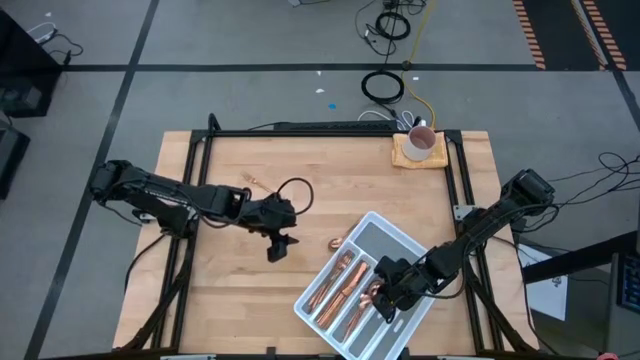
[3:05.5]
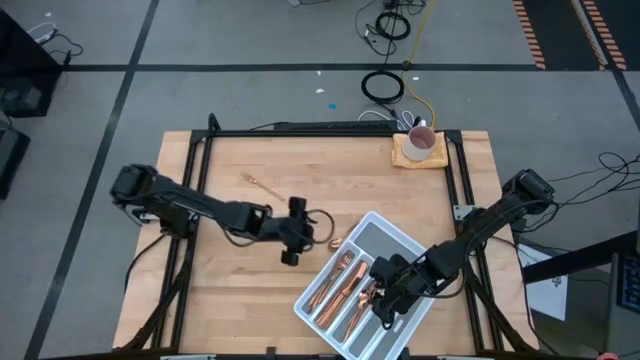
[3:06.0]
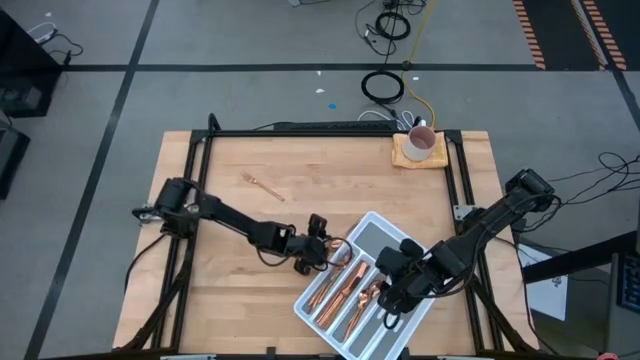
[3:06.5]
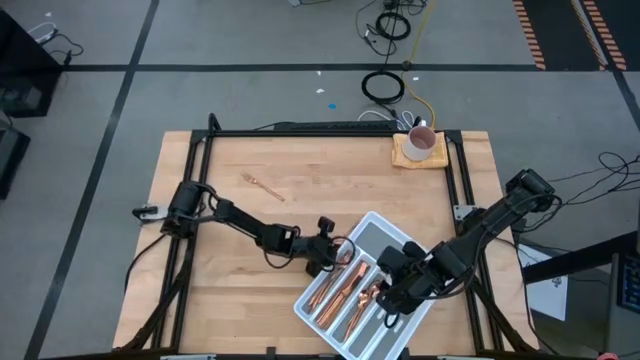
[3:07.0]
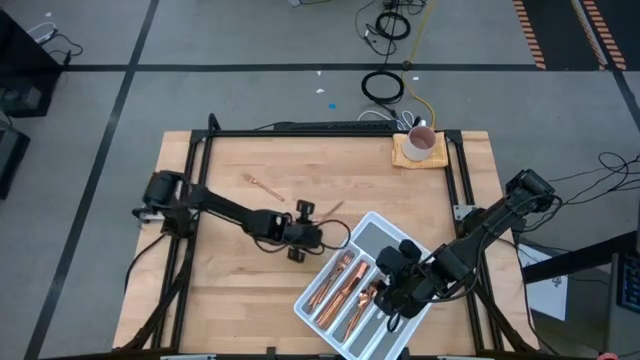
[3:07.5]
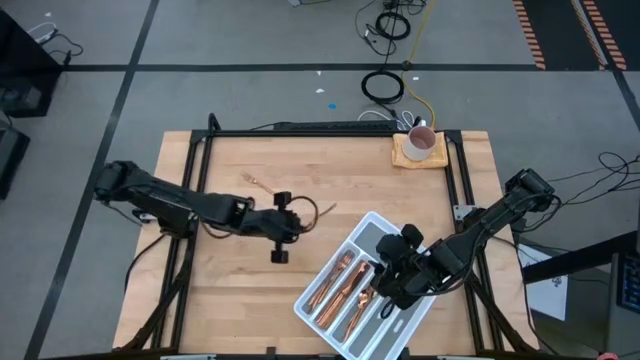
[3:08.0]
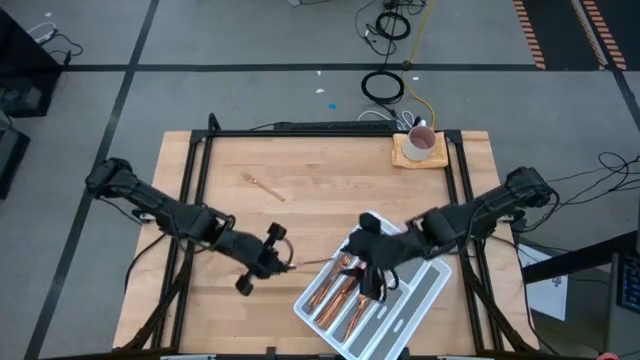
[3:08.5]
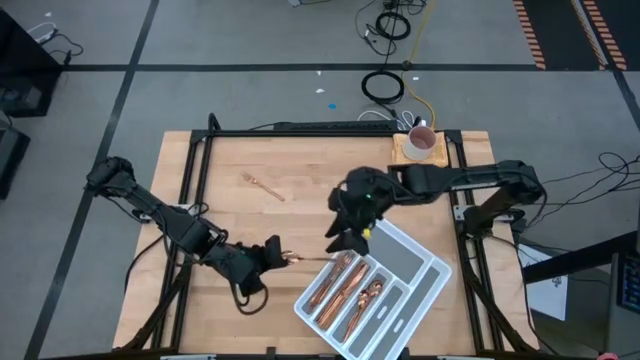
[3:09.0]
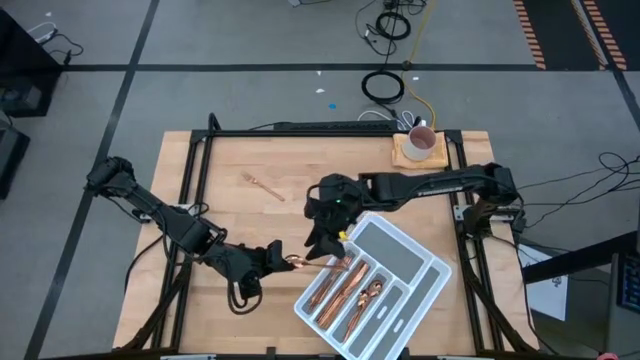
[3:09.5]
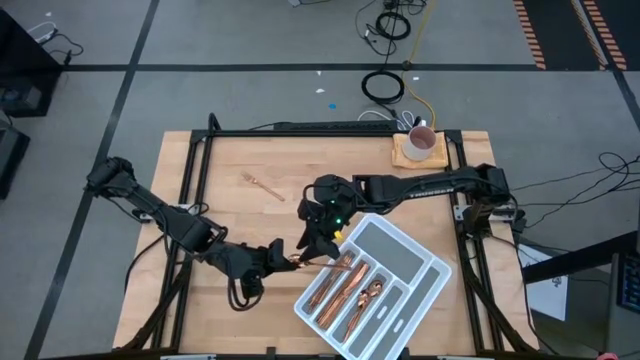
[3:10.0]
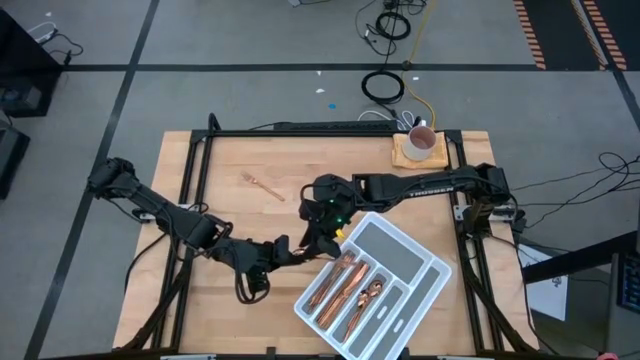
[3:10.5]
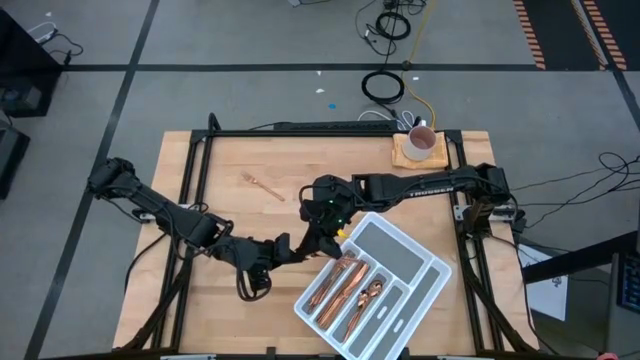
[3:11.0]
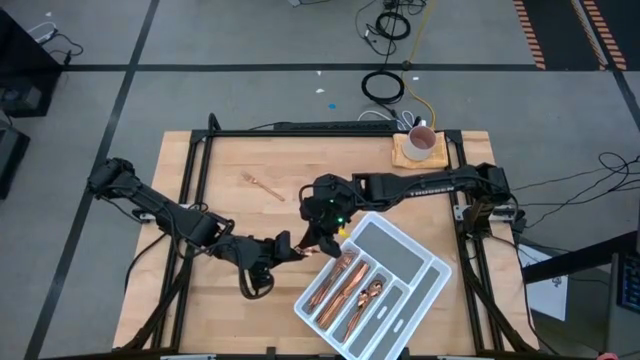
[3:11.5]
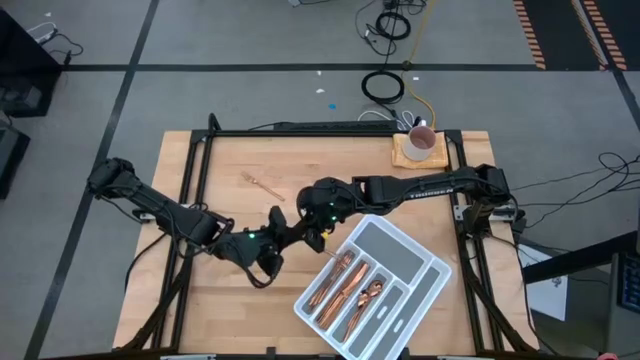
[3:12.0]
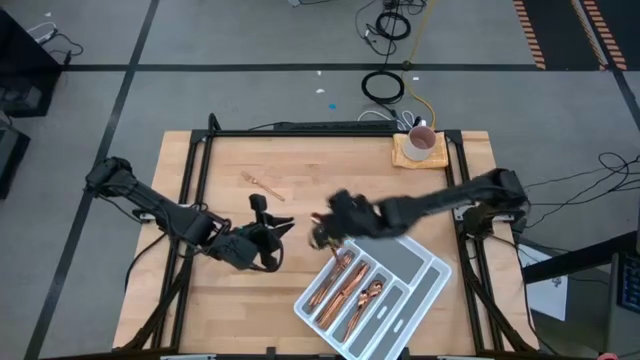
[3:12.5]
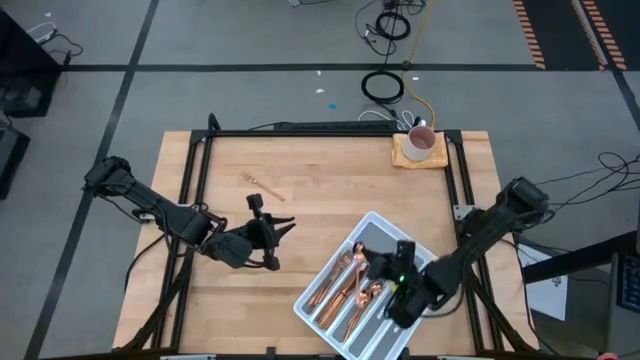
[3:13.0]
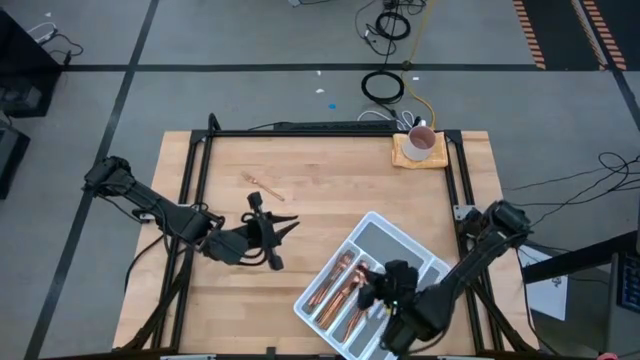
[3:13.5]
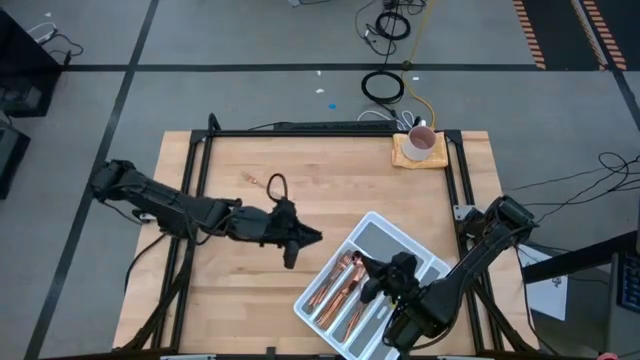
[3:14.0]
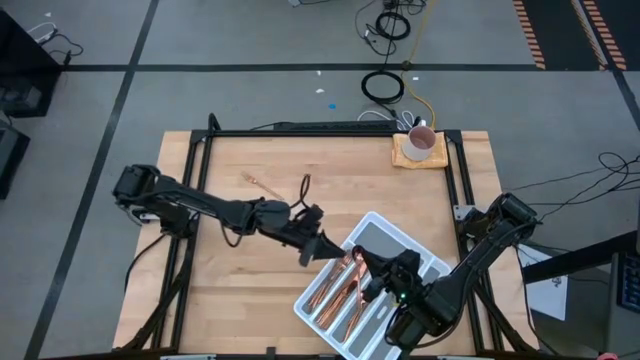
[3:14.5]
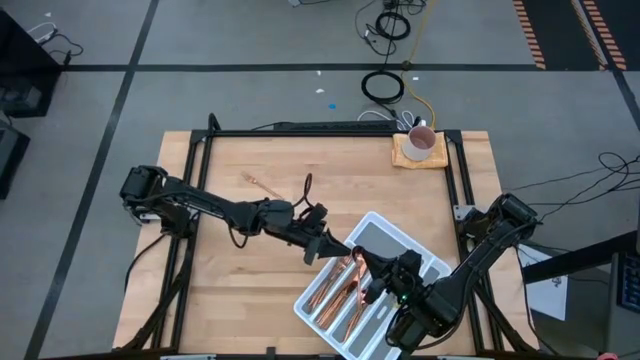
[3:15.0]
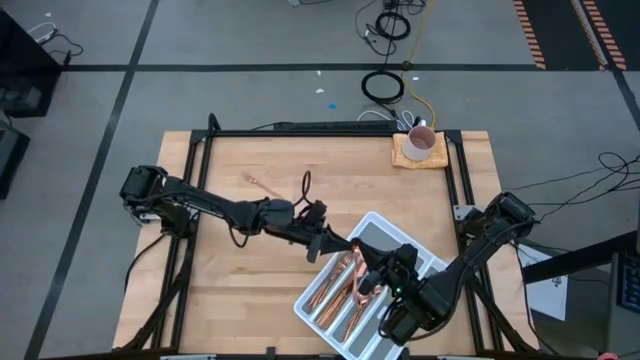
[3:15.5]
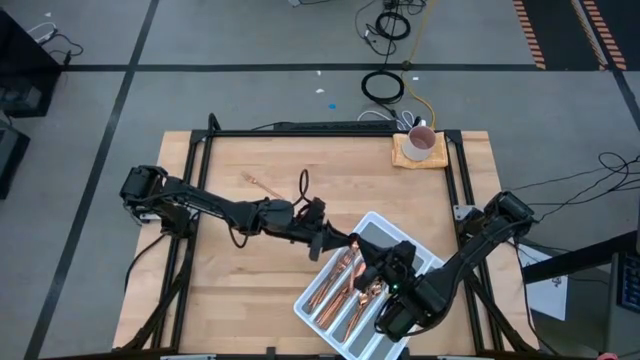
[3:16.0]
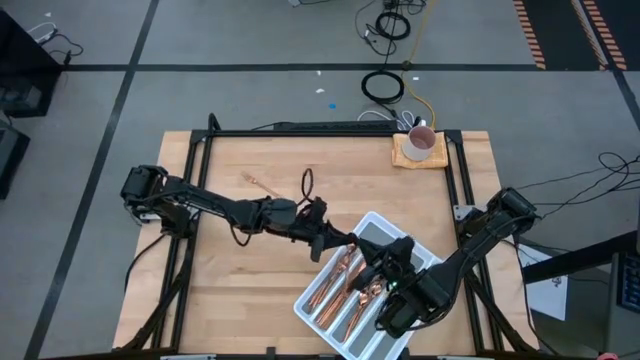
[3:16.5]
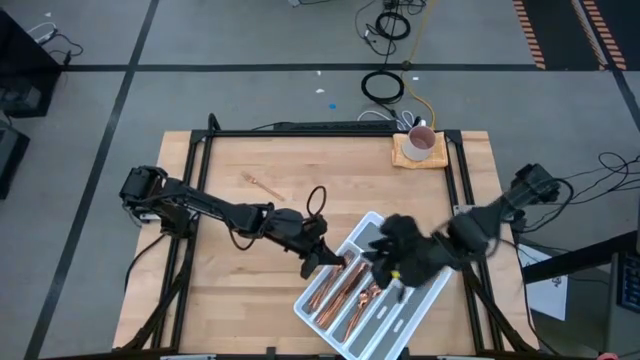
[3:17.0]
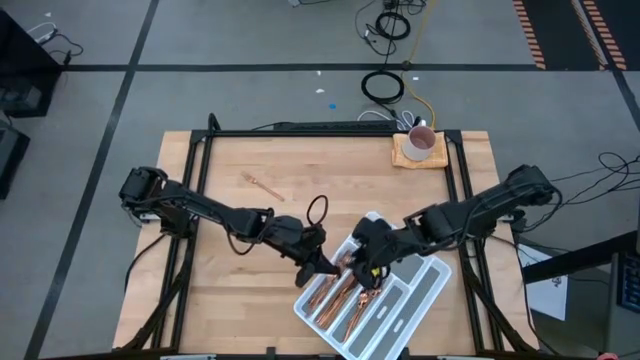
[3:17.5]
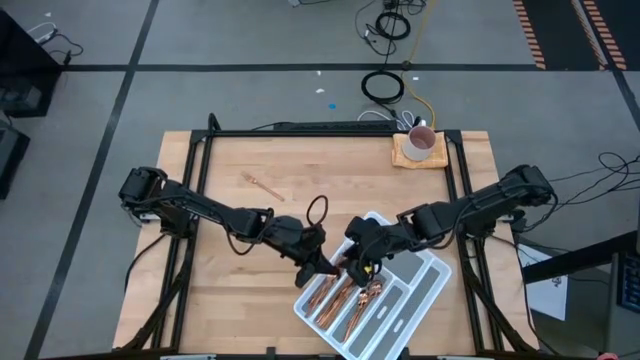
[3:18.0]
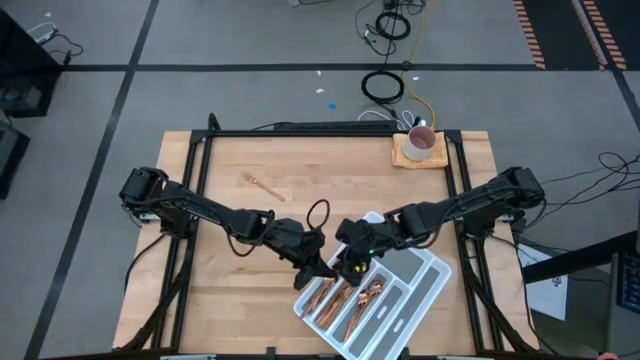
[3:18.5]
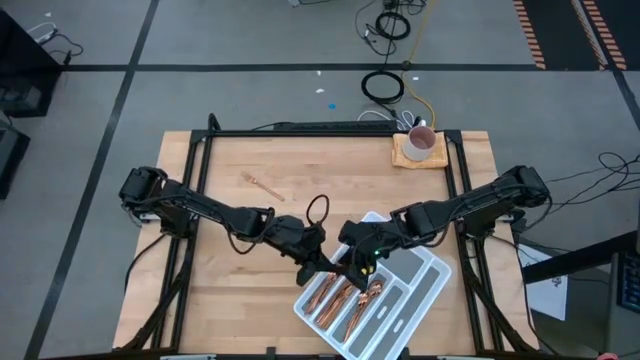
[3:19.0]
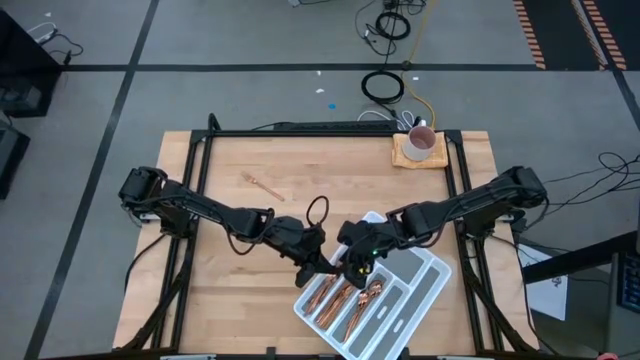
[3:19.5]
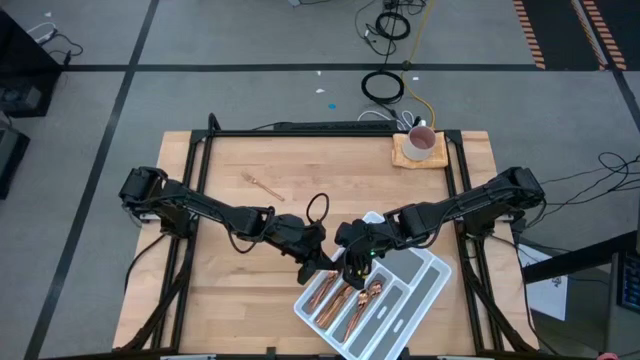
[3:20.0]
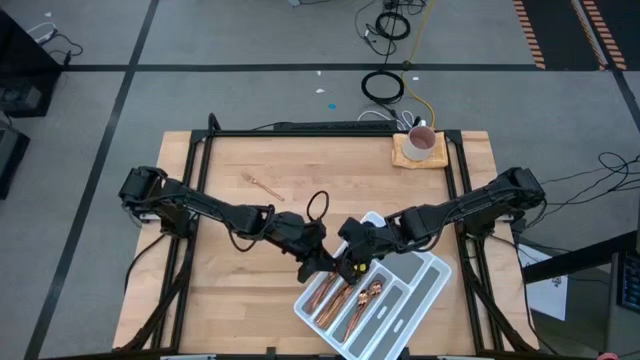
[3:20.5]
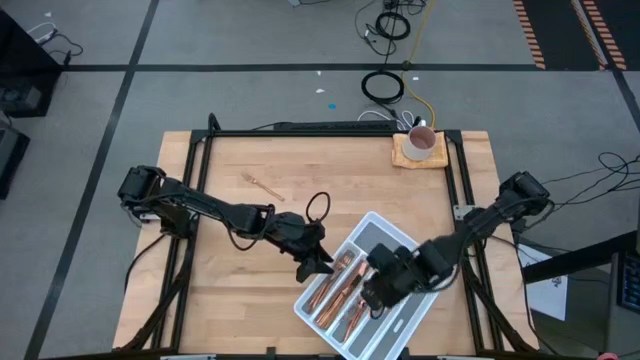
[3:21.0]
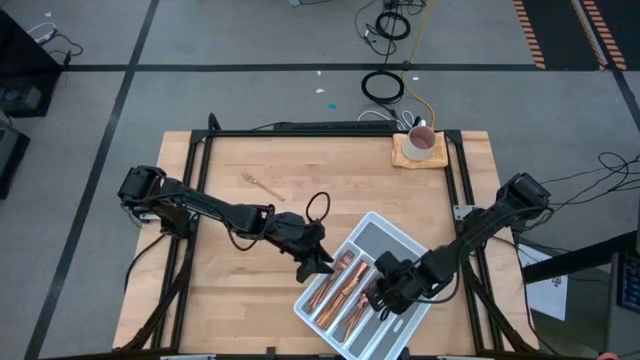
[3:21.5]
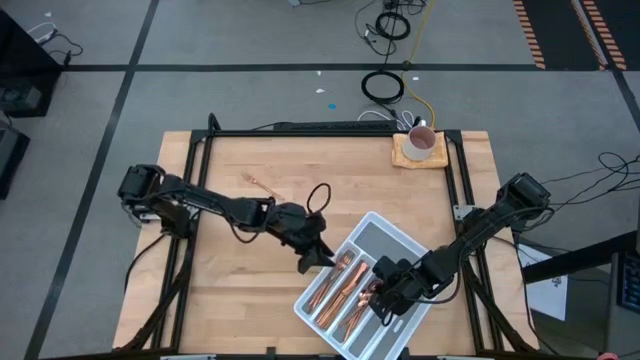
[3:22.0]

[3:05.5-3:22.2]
Task: Sort silverware
Put the gold spoon into the silverware tray
